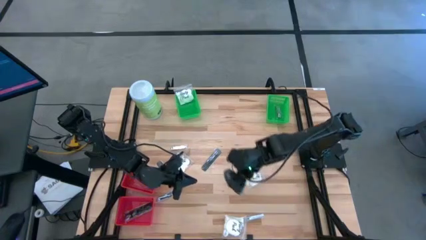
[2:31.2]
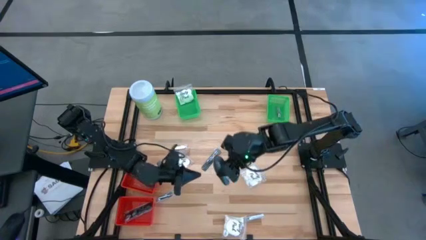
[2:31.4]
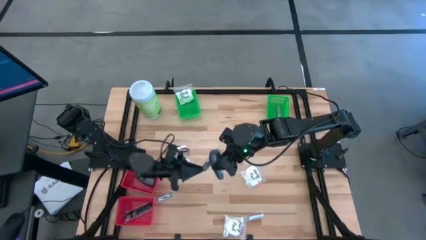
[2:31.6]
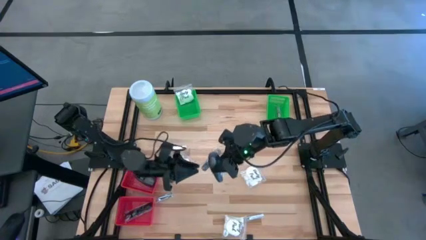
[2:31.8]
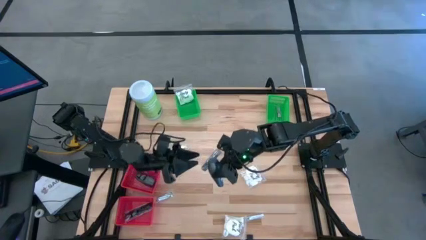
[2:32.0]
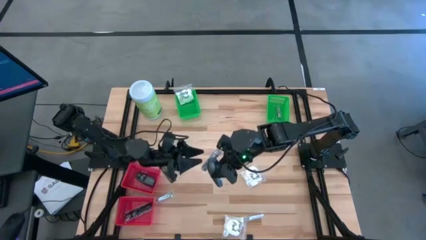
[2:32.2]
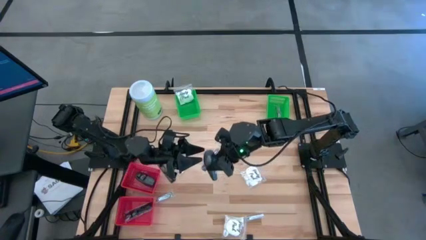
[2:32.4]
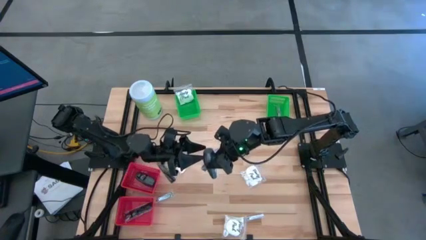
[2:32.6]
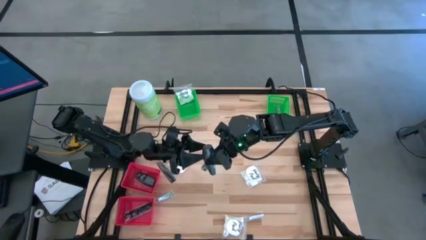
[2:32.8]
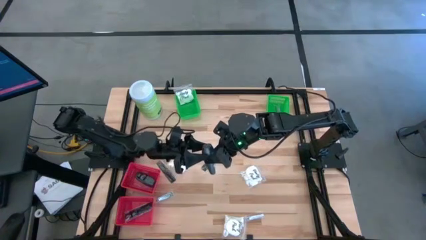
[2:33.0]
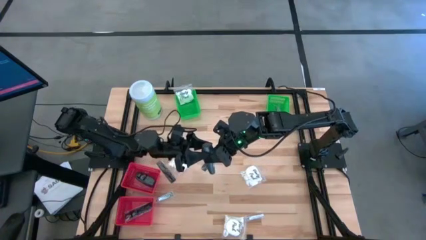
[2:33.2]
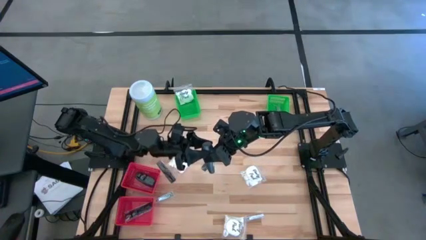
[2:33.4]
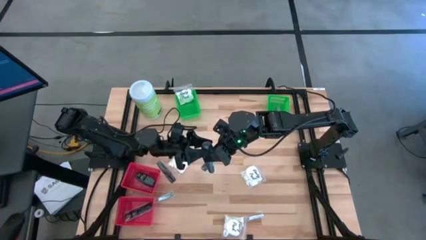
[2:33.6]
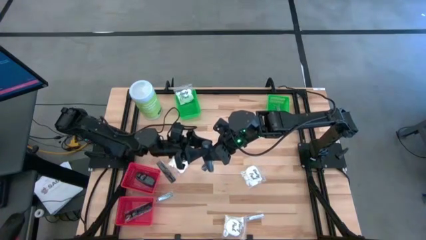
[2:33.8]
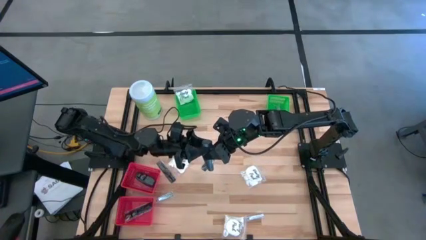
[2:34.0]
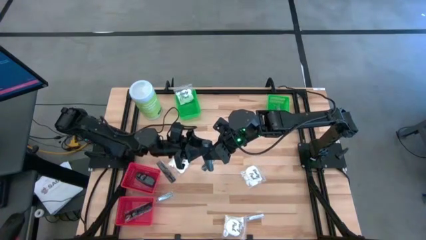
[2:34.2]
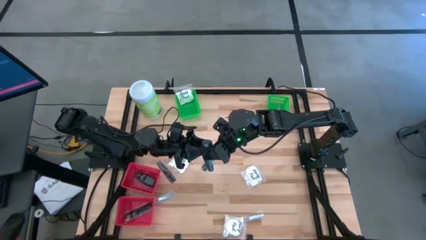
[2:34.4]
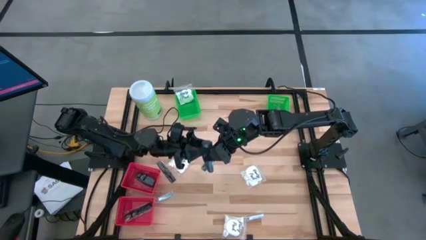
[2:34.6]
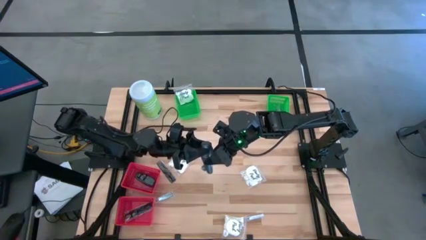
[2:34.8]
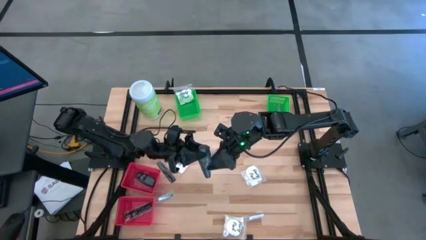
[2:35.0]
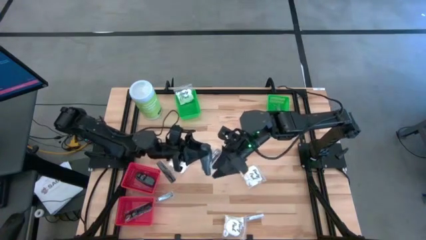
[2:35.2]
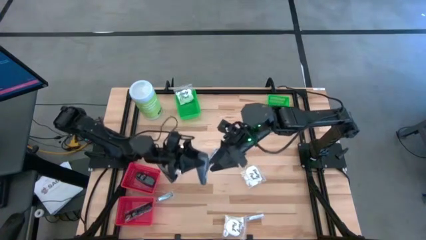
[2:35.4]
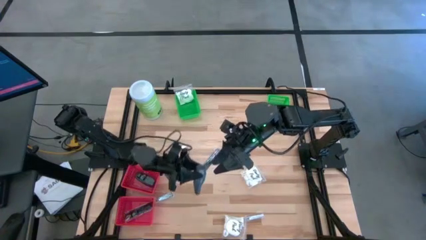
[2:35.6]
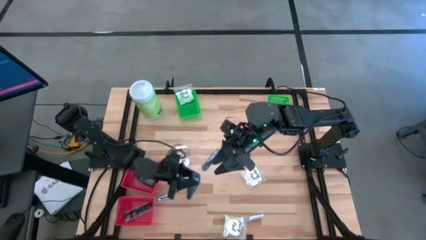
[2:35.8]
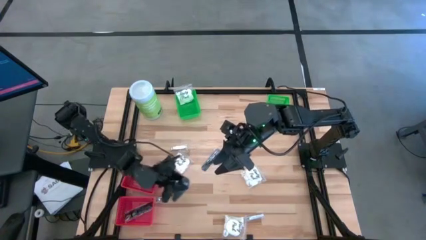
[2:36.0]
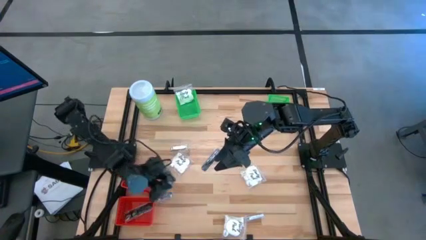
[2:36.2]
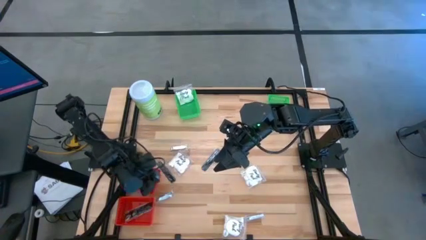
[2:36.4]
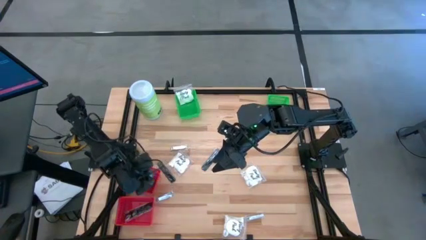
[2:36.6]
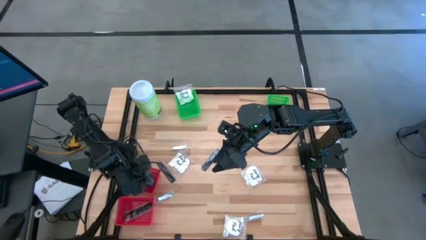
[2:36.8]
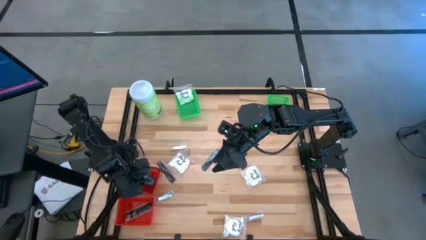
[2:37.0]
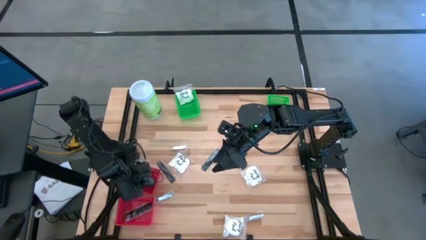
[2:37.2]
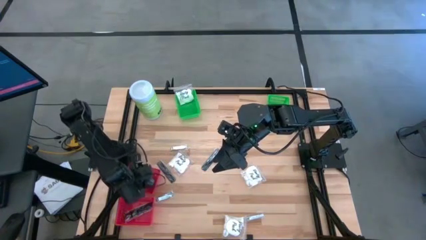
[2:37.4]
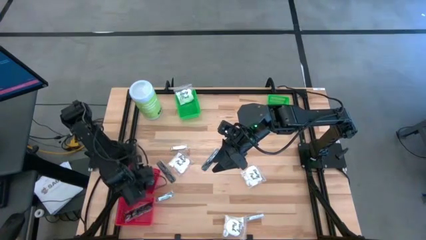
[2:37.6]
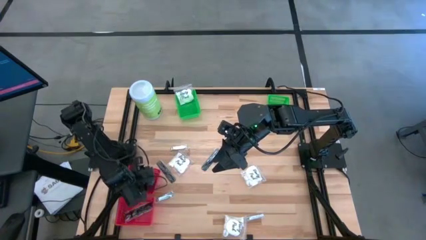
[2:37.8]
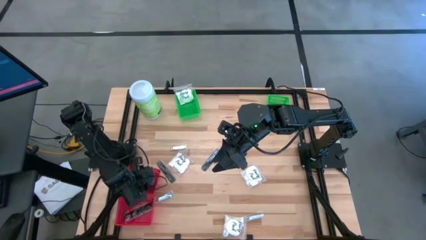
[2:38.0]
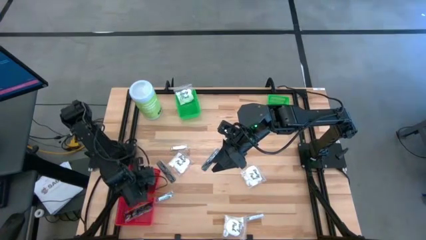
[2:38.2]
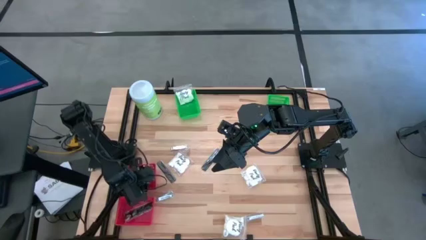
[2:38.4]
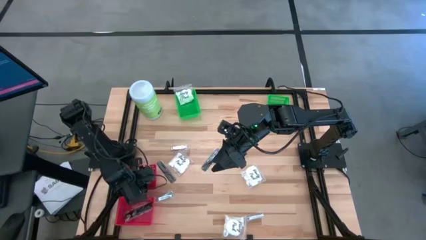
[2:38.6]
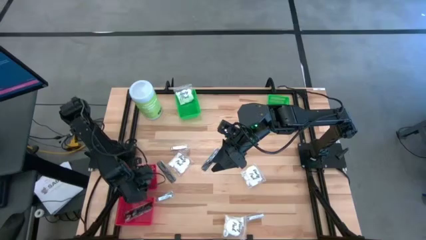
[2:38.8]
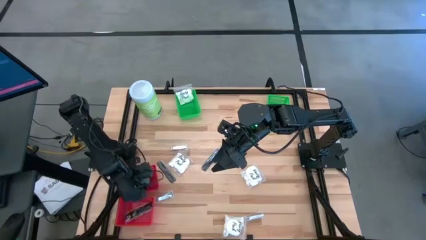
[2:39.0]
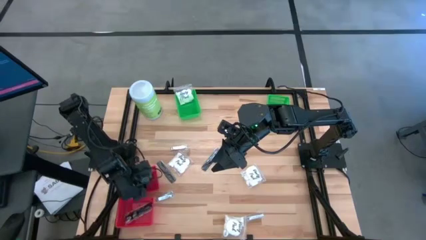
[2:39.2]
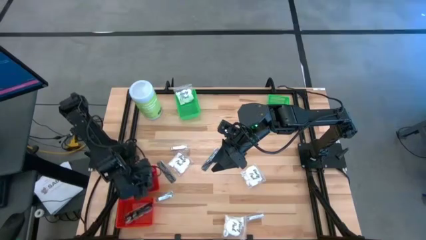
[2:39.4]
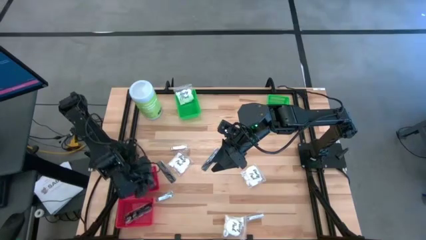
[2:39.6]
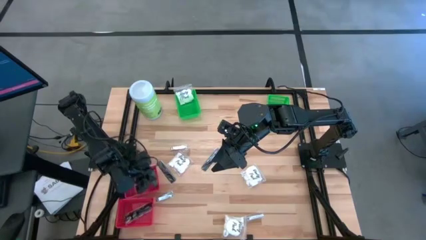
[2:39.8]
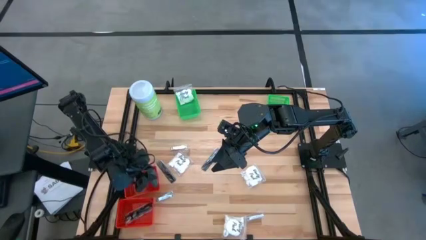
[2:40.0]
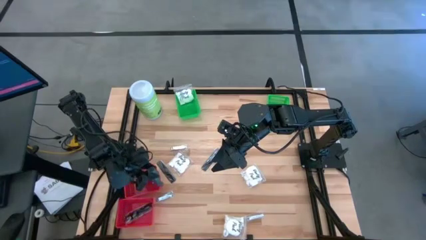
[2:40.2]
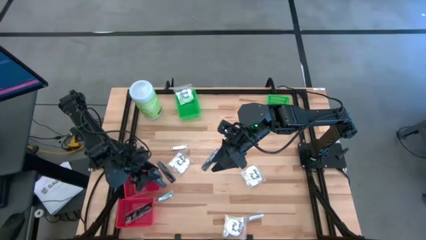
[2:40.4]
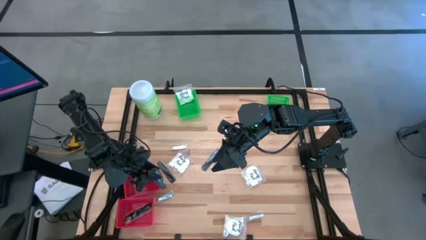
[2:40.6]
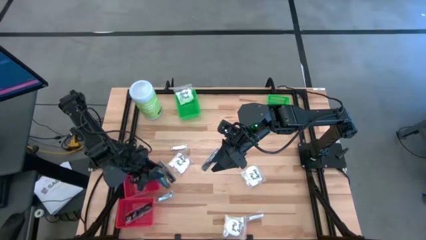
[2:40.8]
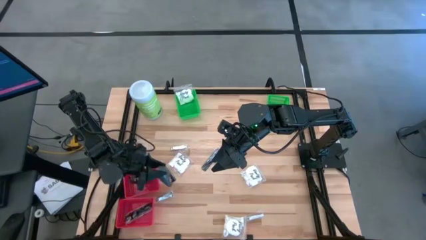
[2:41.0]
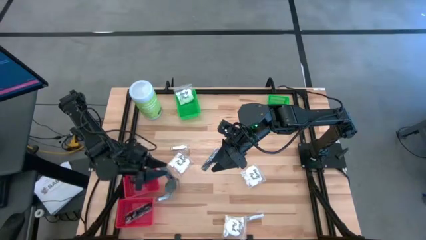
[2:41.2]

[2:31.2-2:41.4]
Task: Pick & Place Travel size toiletries
Put the black deodorant into the top red basket

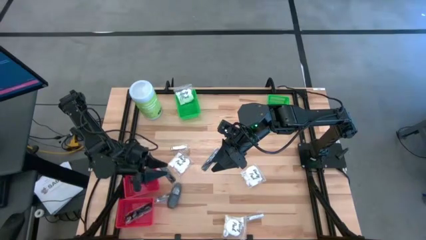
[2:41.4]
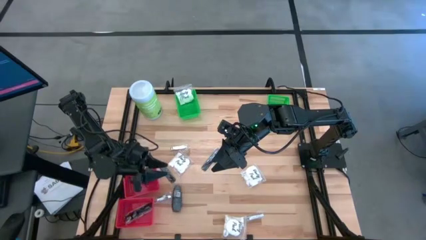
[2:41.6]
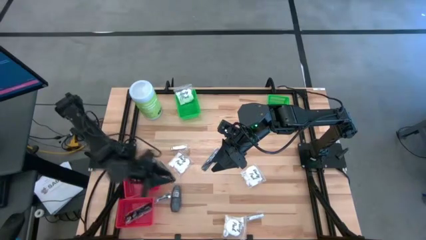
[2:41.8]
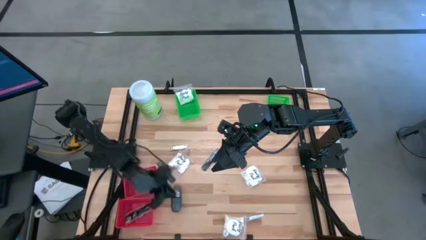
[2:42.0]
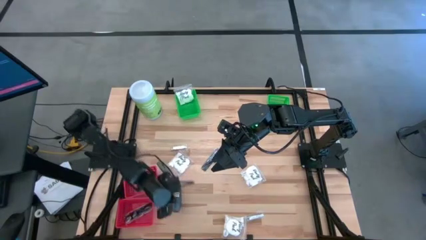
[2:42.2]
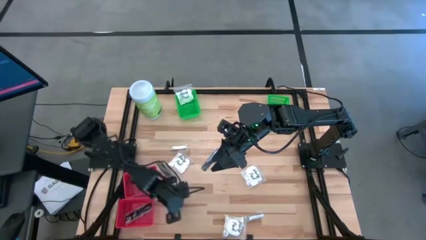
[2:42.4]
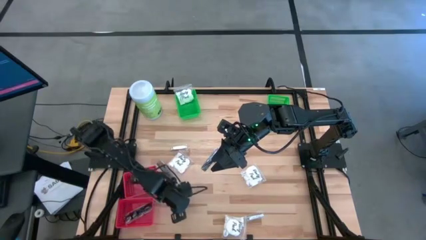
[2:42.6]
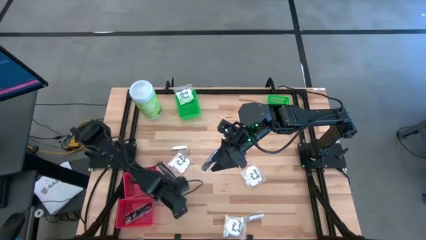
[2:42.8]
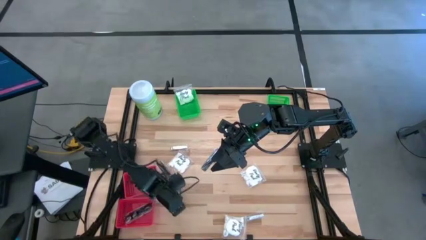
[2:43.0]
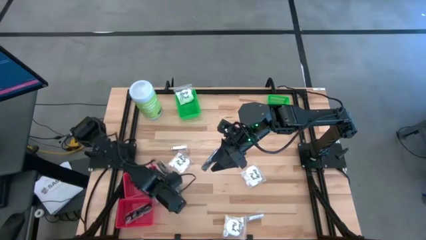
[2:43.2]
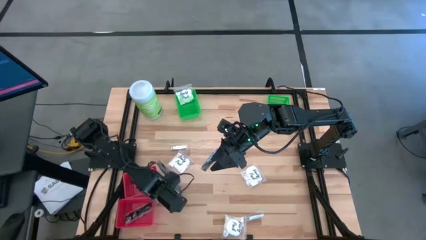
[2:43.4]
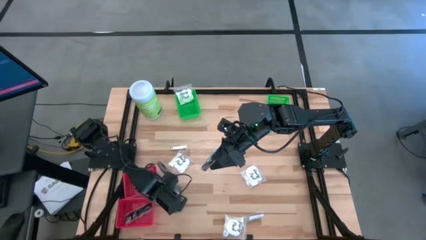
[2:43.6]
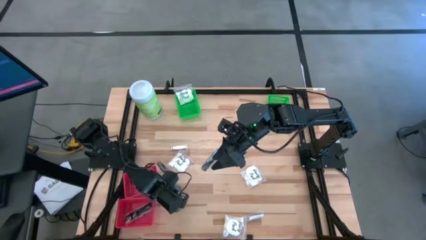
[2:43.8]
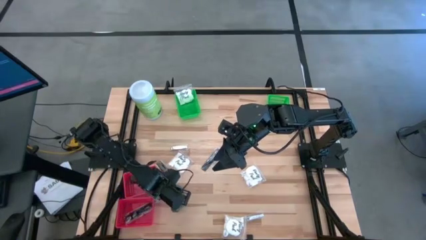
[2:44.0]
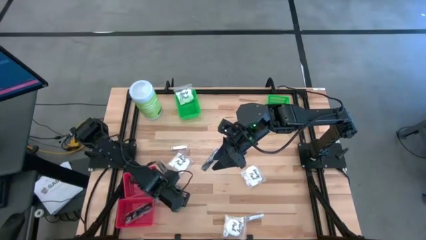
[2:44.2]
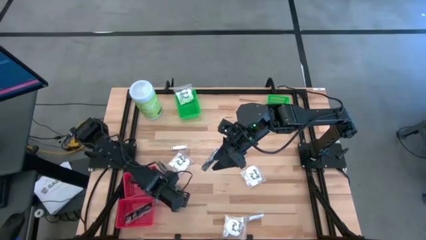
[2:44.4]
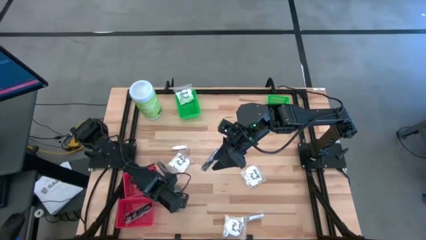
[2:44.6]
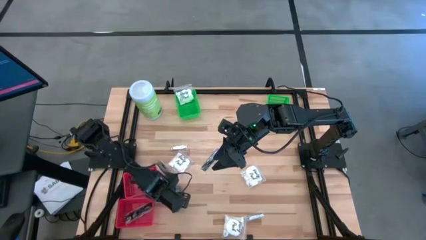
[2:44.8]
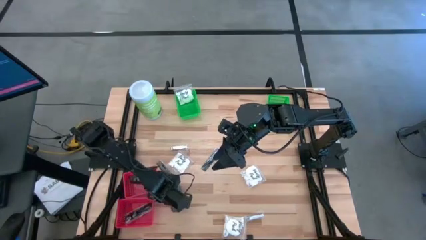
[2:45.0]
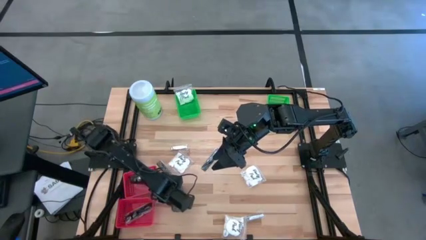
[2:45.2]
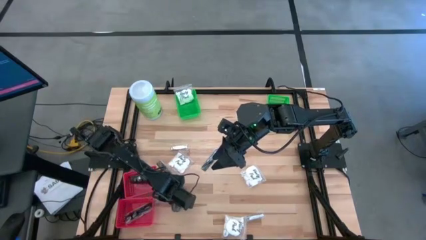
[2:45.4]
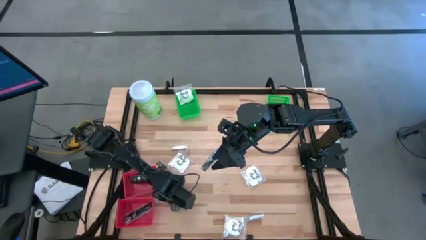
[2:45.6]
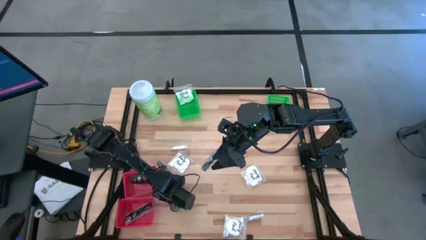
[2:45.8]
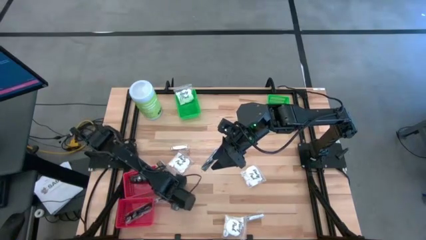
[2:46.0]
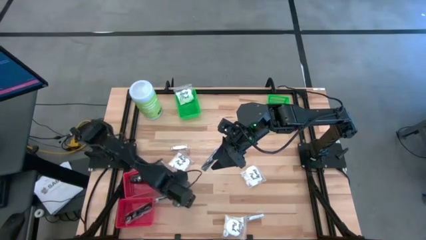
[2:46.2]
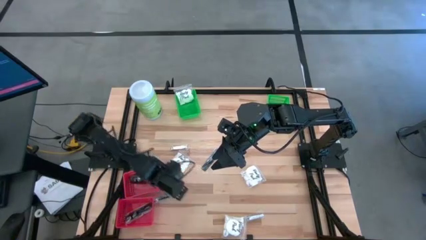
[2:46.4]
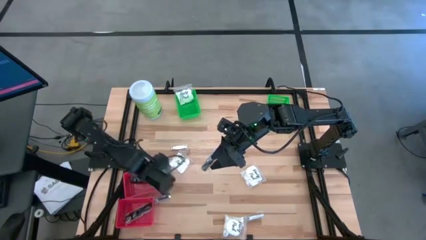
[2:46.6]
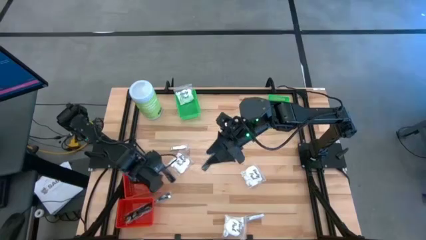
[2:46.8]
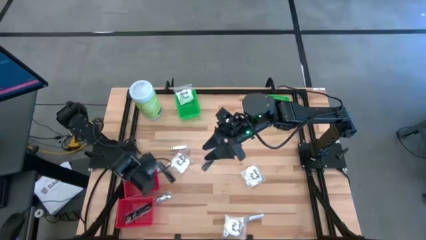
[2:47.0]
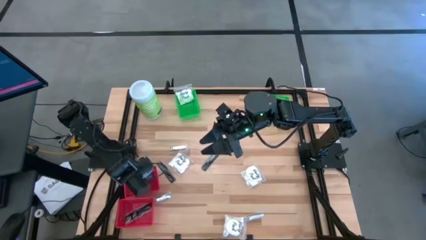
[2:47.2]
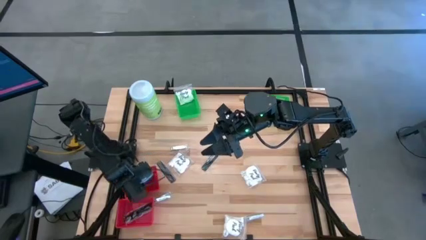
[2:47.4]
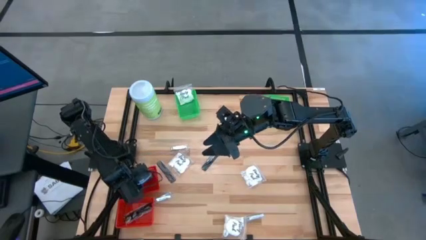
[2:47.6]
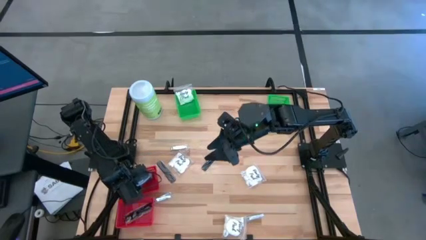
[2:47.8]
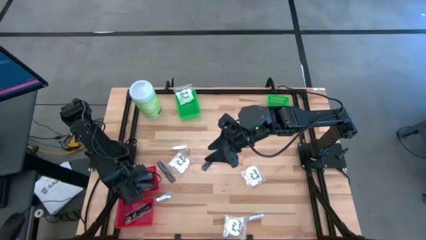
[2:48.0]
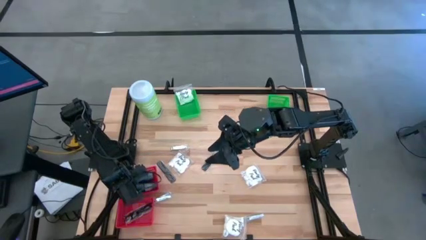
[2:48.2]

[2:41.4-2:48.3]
Put the black deodorant into the top red basket
